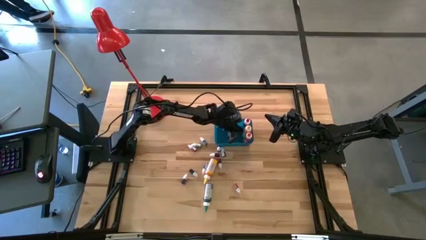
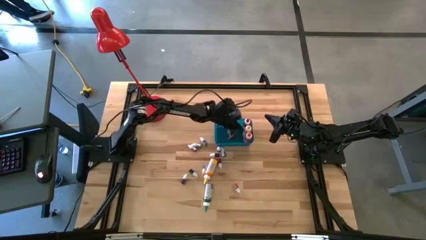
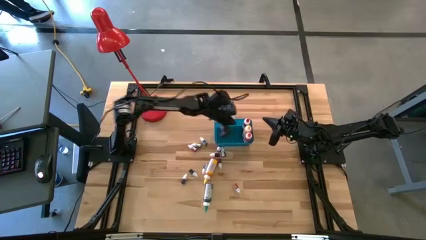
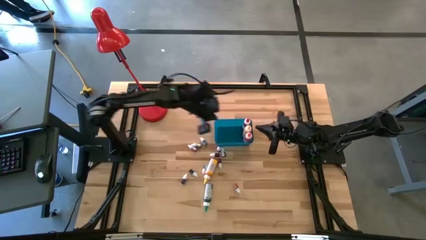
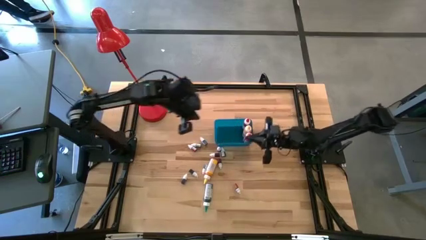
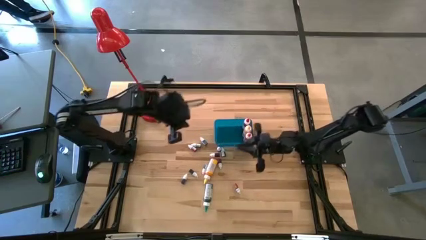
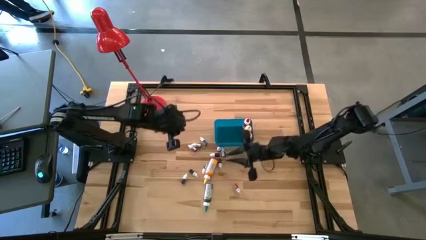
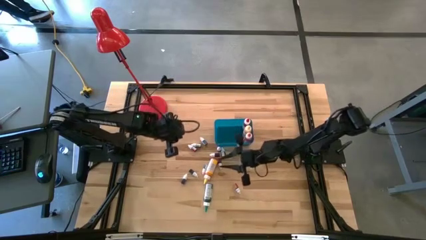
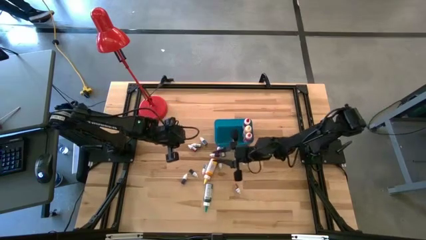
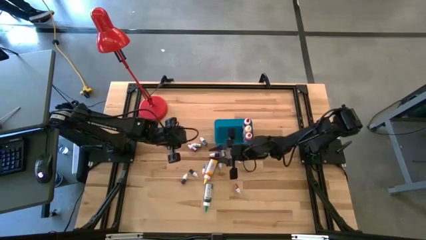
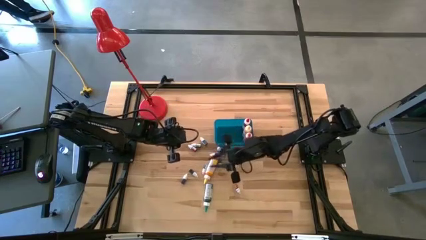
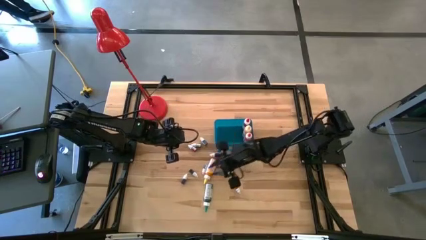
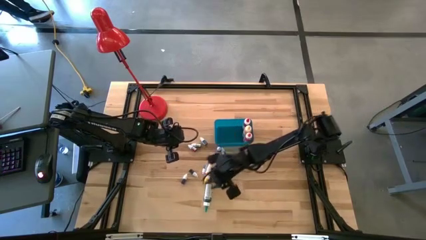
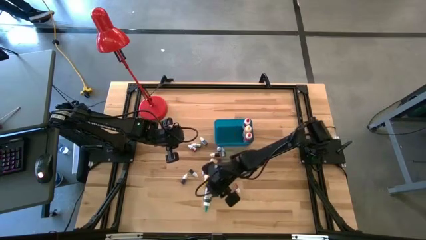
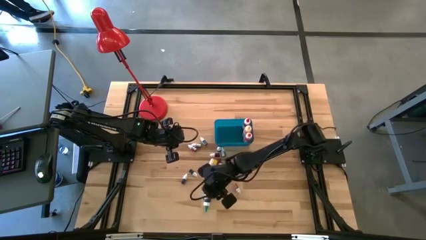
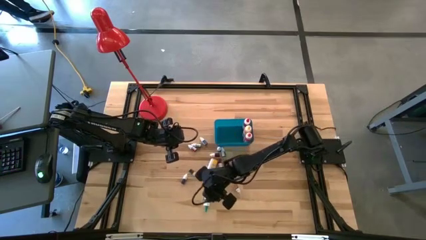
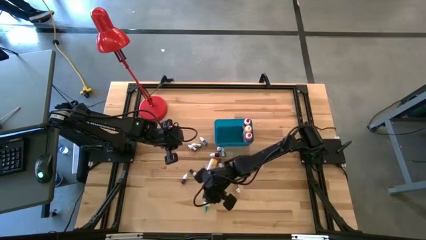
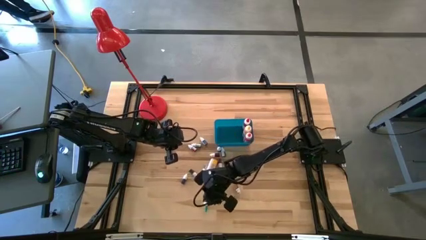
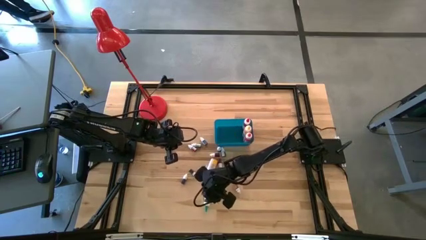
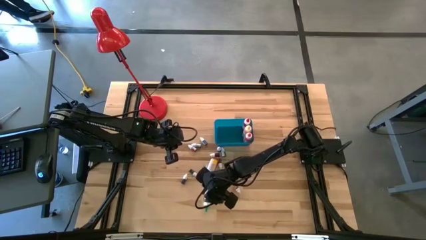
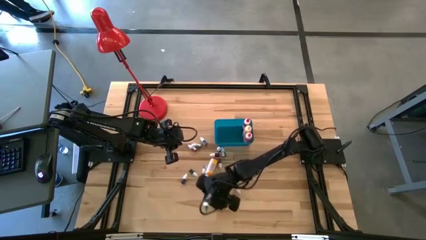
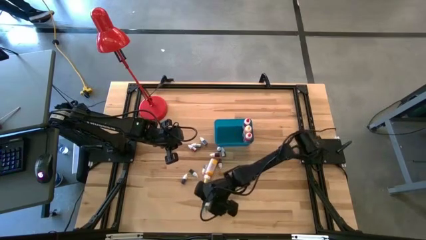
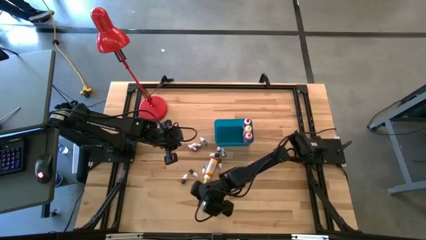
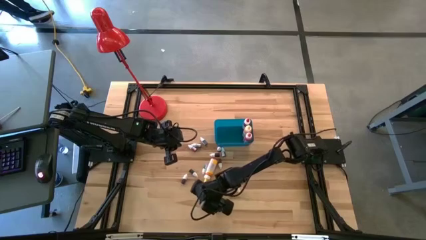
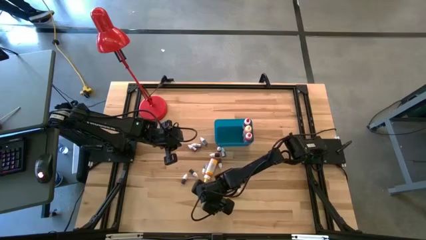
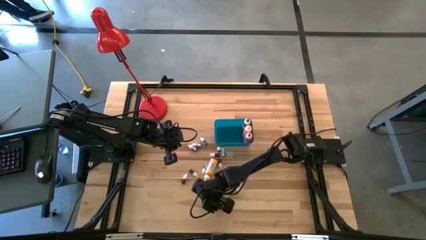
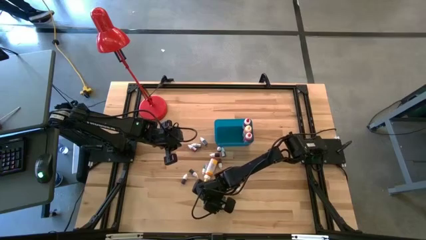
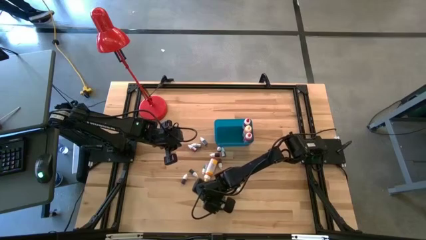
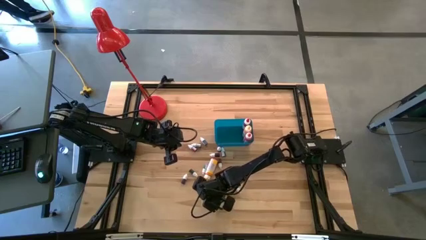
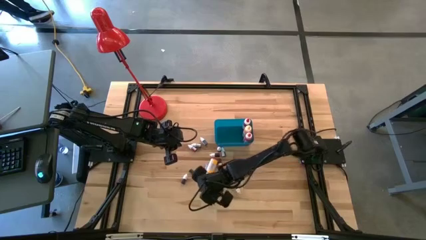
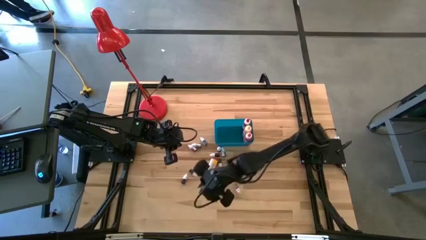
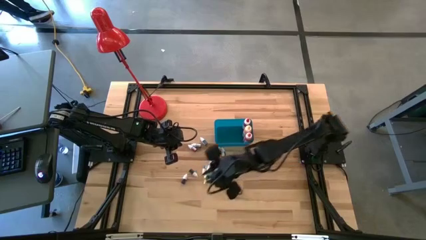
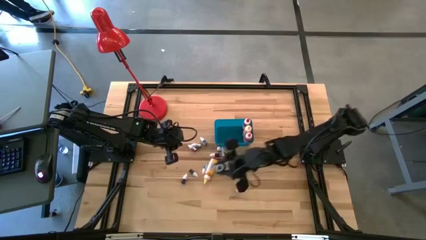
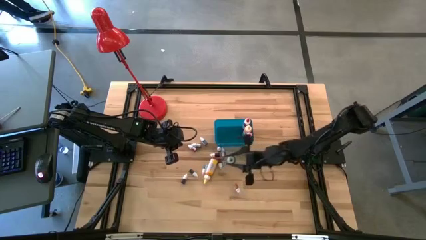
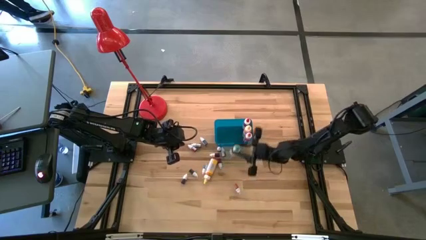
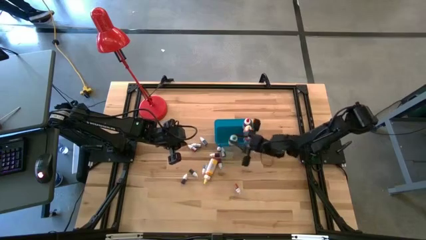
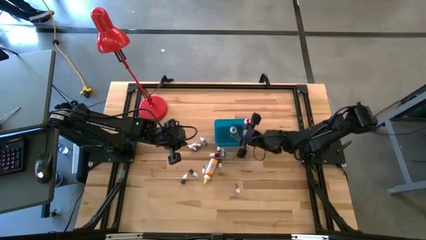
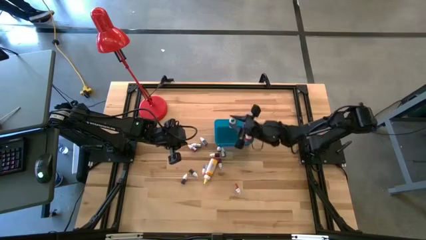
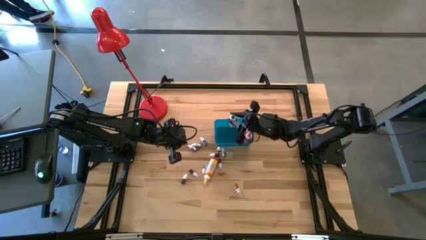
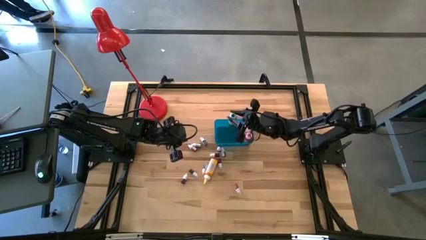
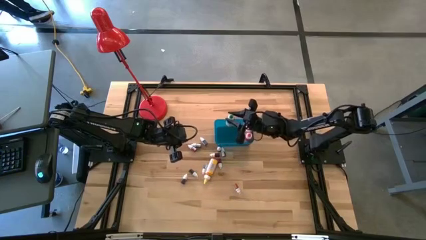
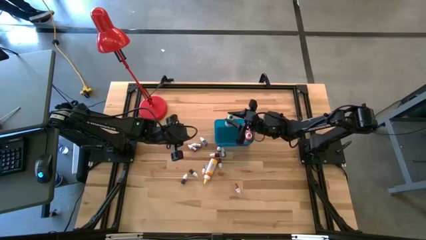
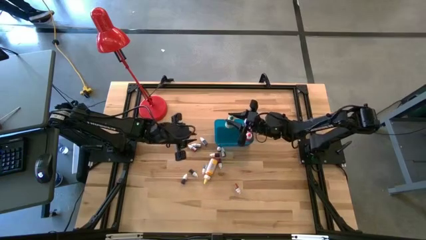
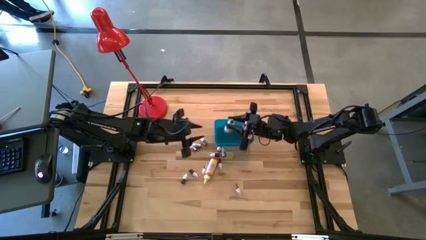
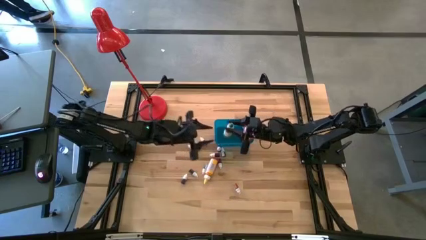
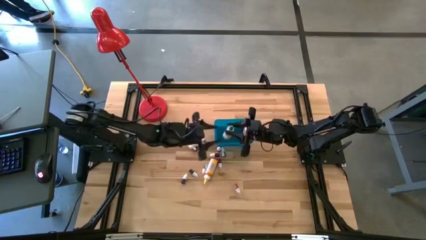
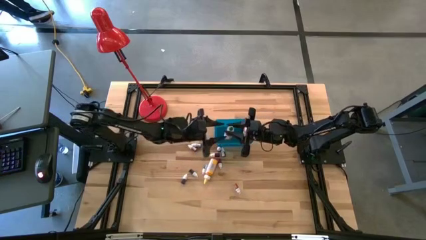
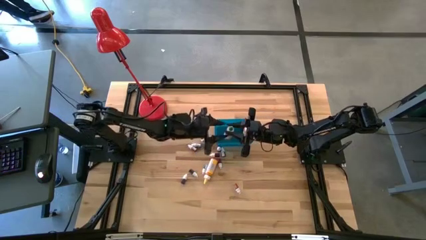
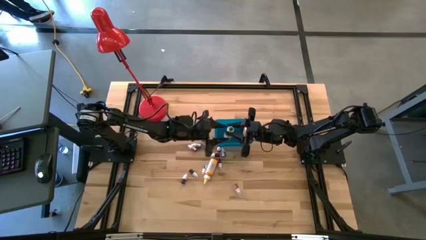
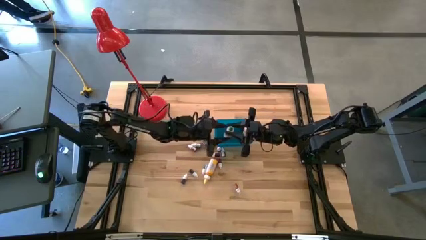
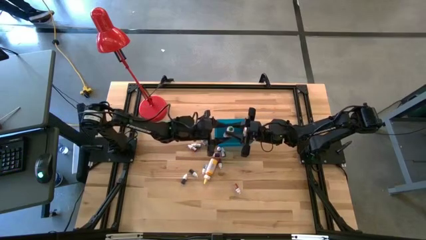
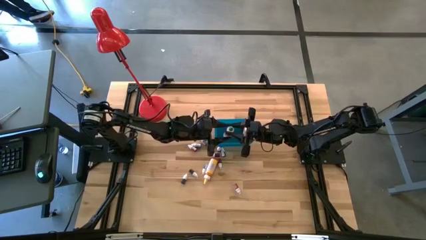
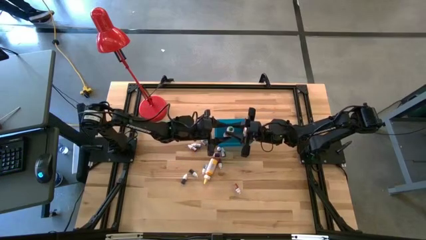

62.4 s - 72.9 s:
Task: Pick & Place food coloring
Put the big green food coloring bottle into the blue bin

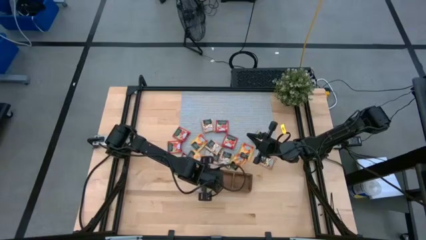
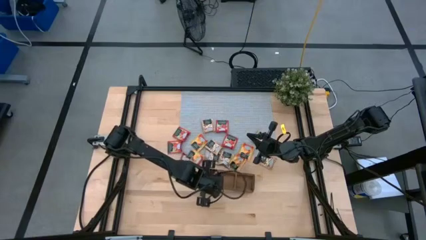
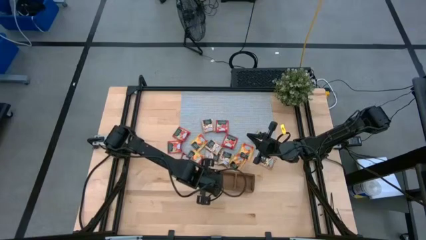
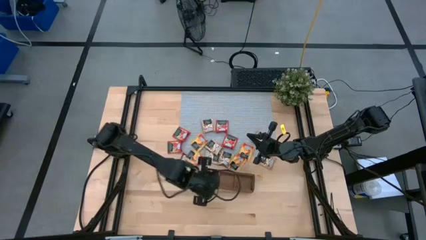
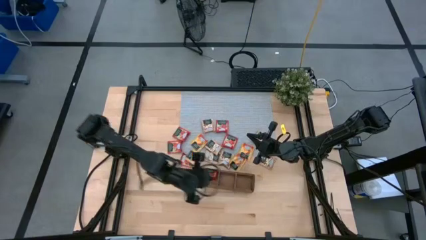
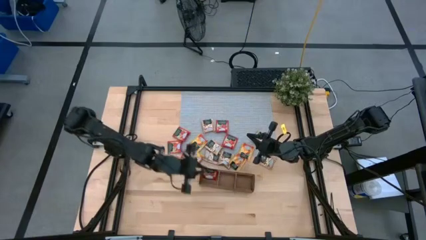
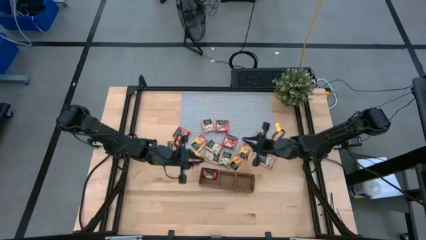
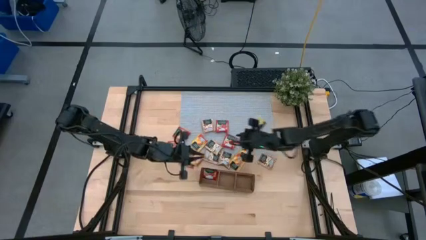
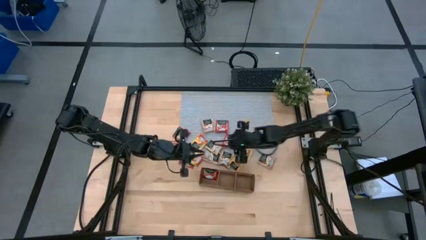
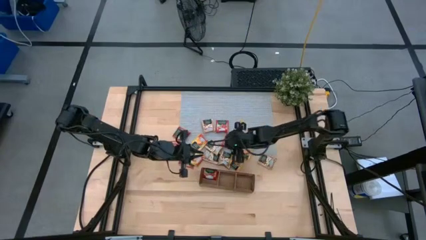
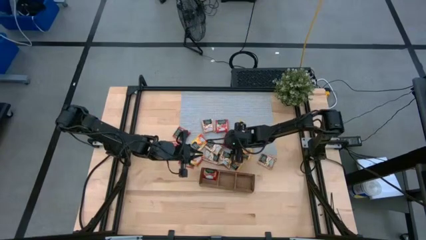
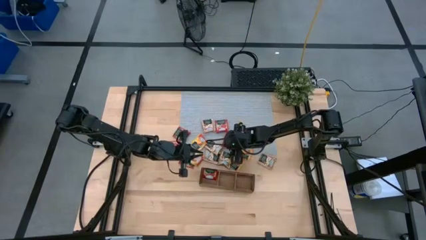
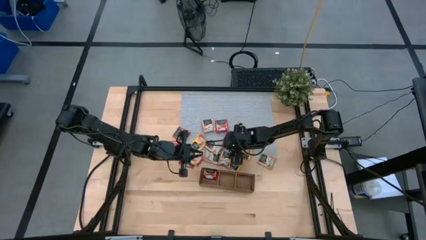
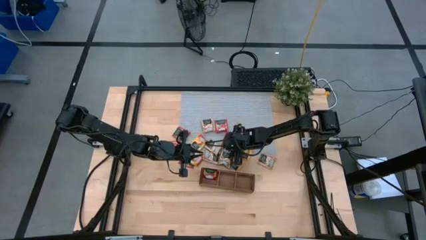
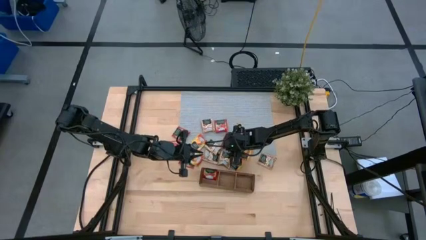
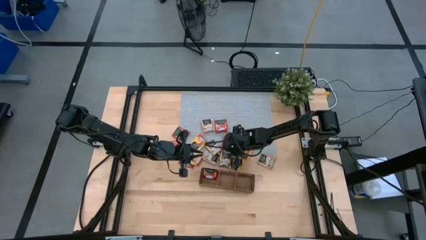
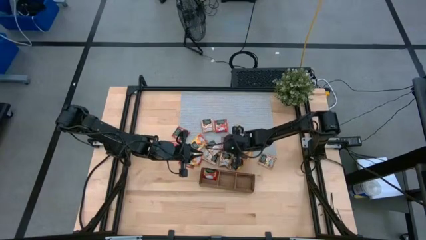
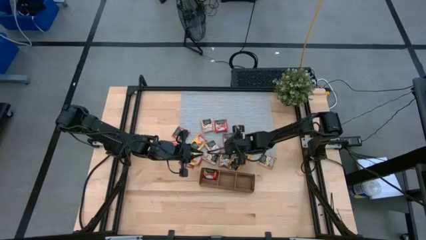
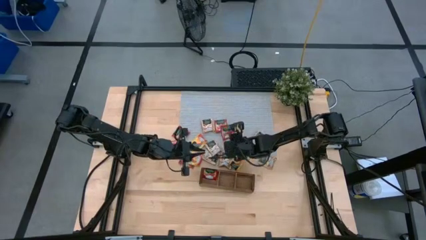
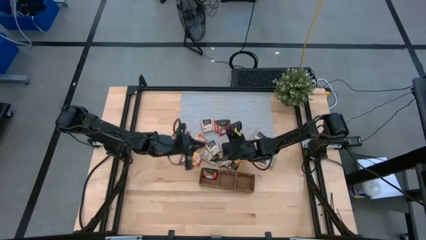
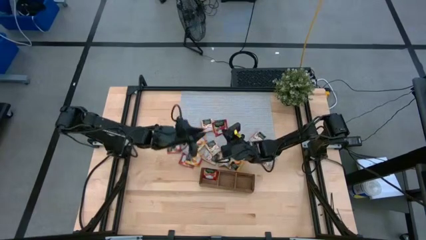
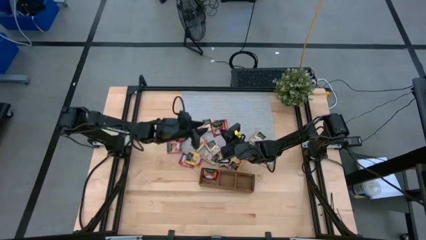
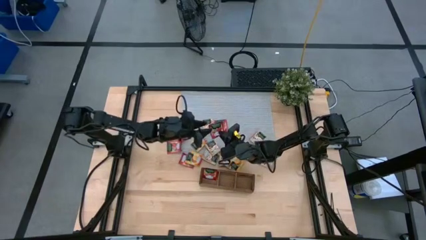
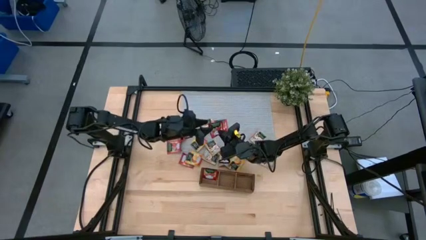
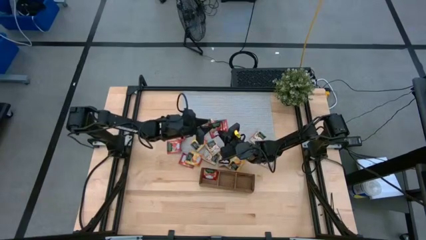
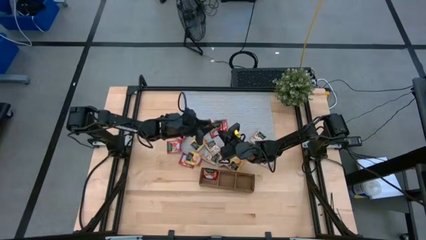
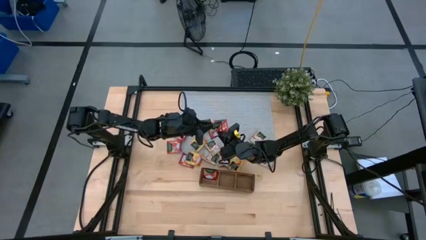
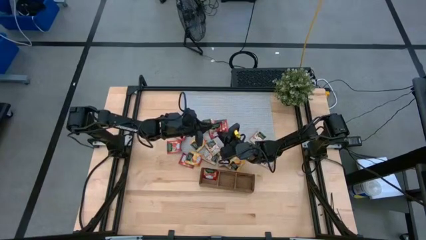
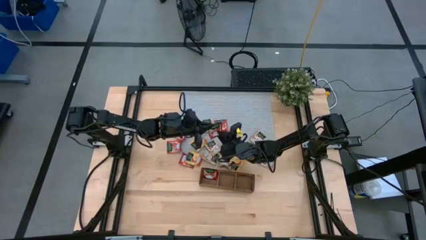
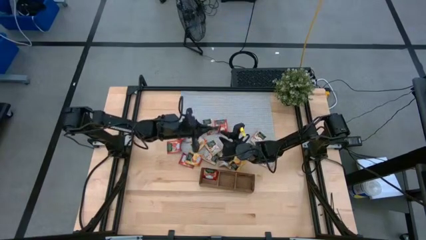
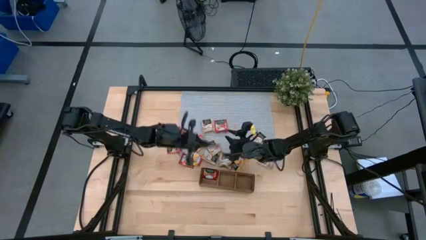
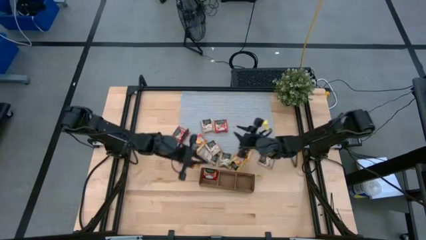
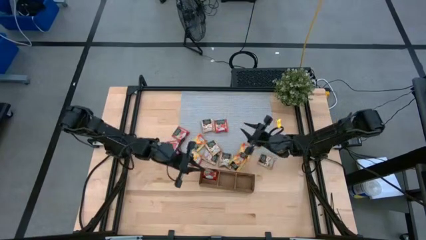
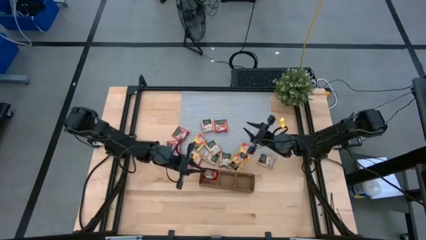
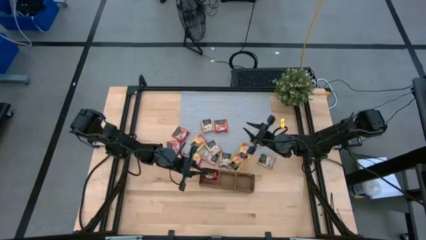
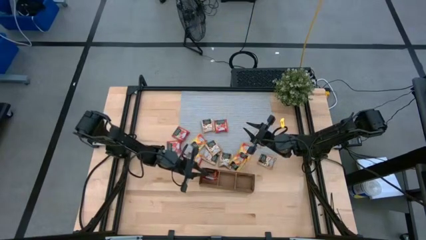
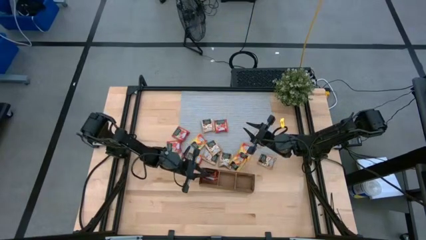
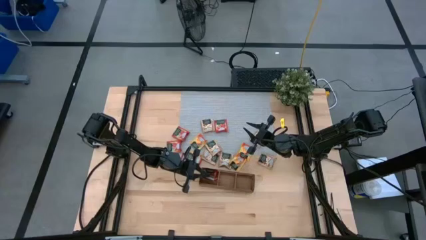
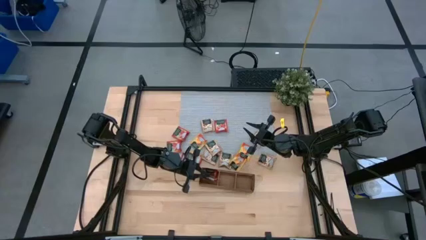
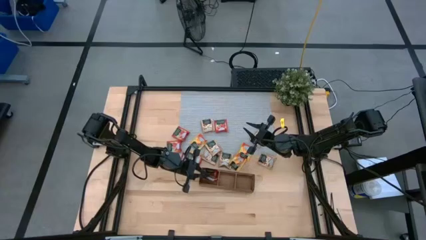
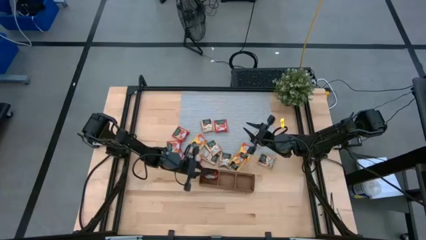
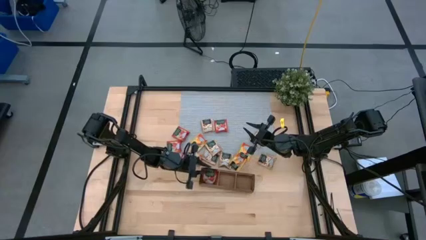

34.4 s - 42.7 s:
Task: Pick & Place Tea
Put the red tea bag into the left section of the wooden organizer
